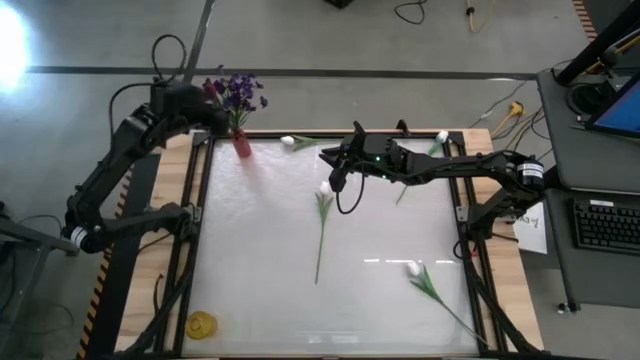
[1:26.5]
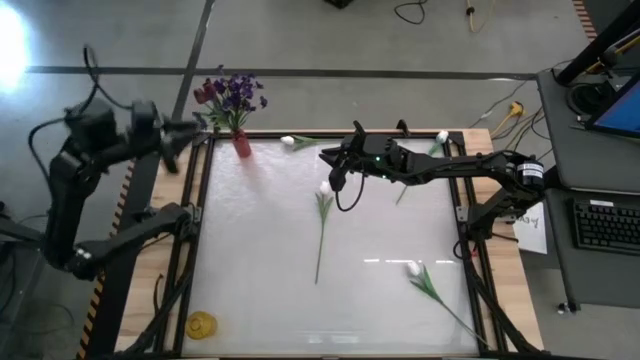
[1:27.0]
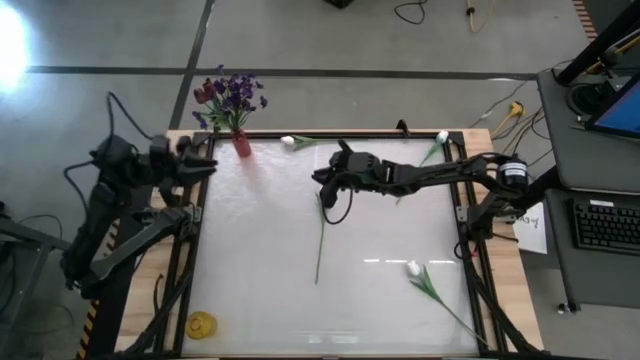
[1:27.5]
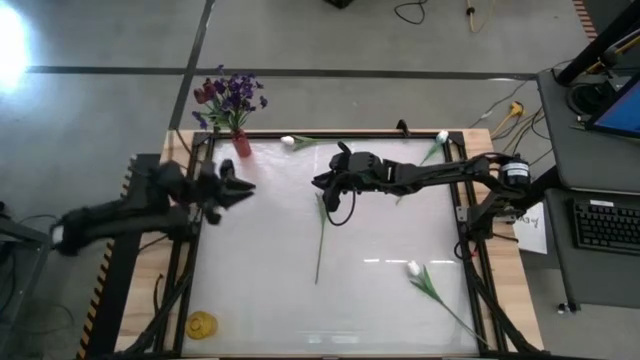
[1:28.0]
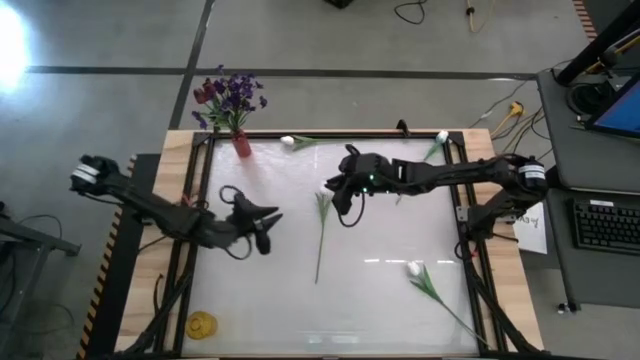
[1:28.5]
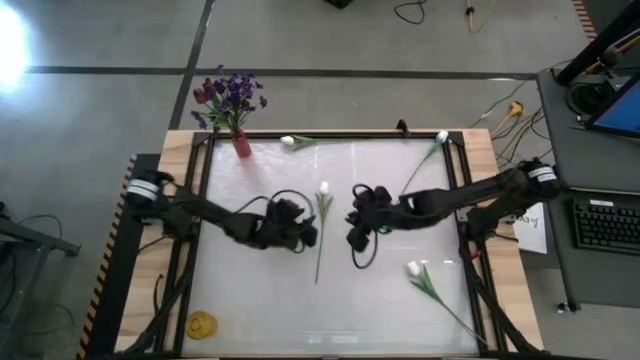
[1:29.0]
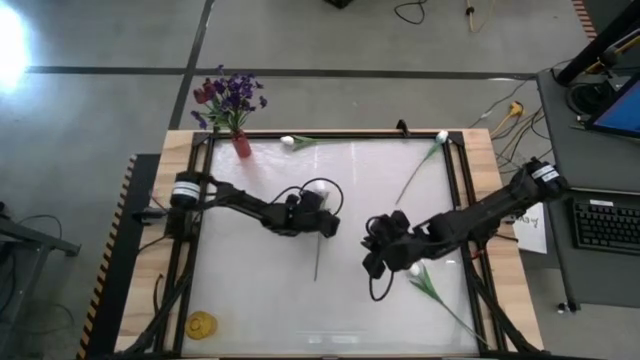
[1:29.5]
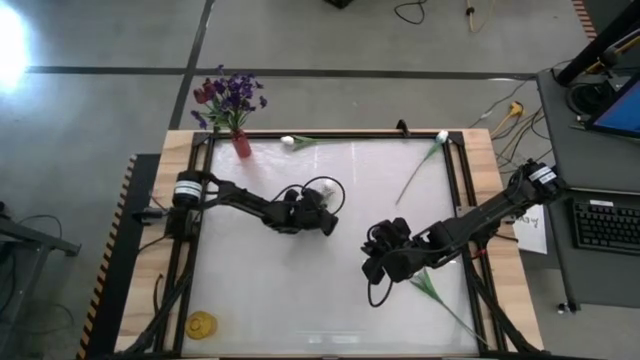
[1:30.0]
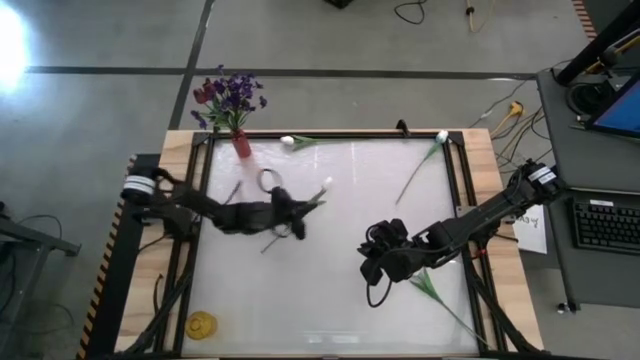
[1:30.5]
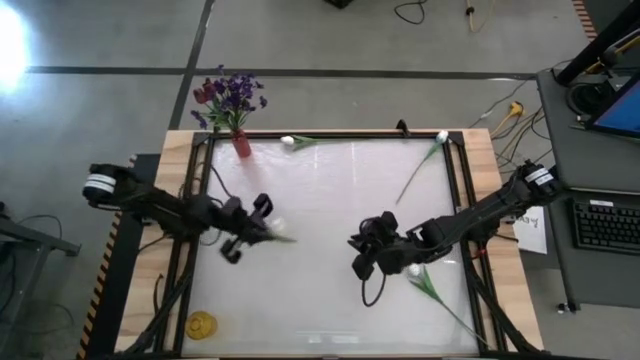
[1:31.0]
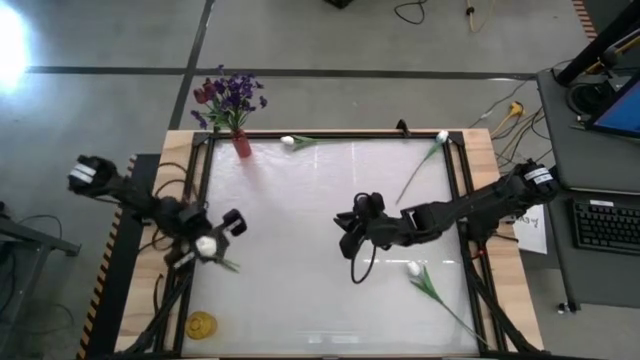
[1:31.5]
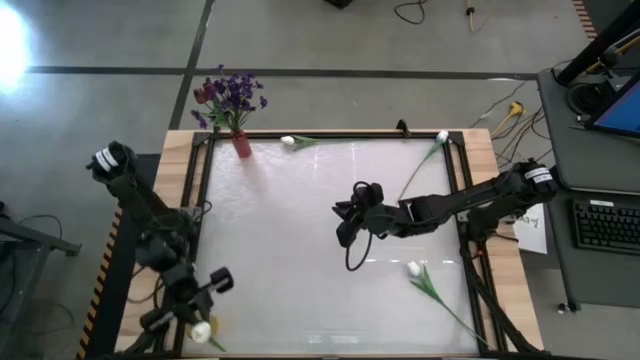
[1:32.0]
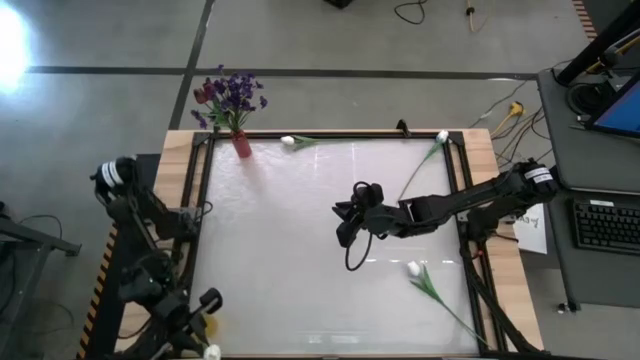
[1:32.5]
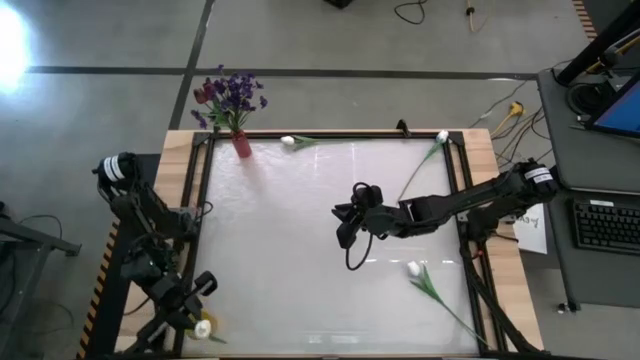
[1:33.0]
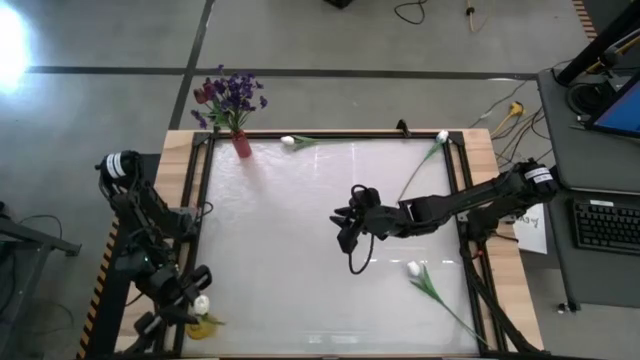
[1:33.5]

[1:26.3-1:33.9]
Task: Sort flowers into vase by color
Put the middle white flower into the yellow vase

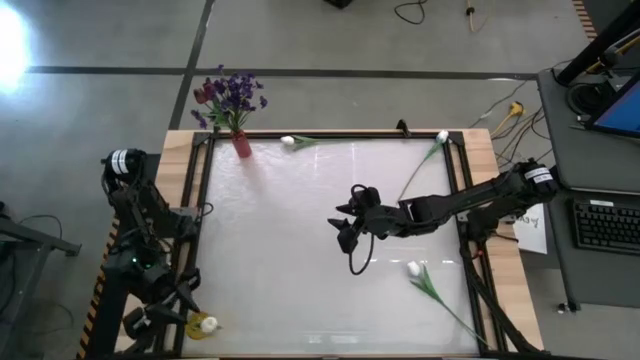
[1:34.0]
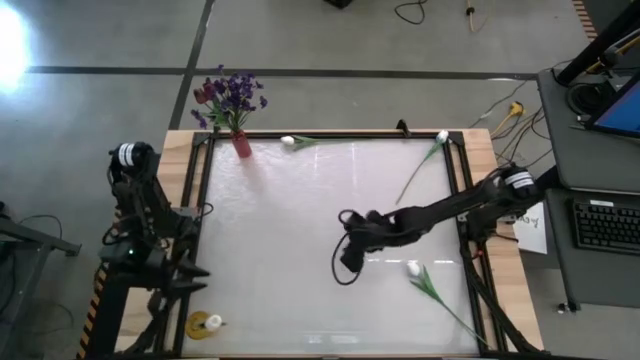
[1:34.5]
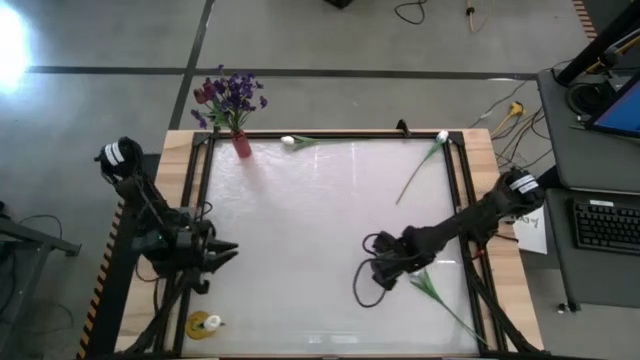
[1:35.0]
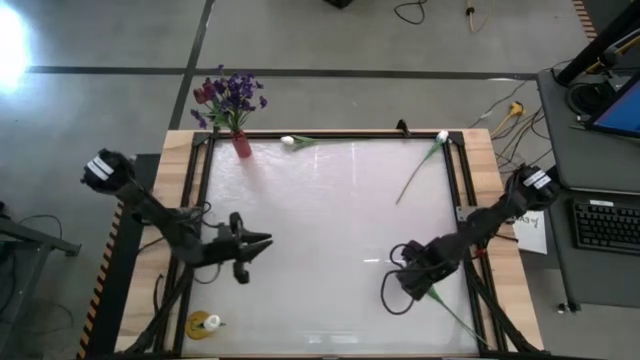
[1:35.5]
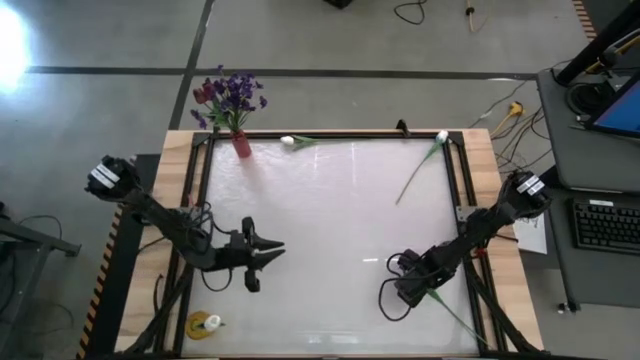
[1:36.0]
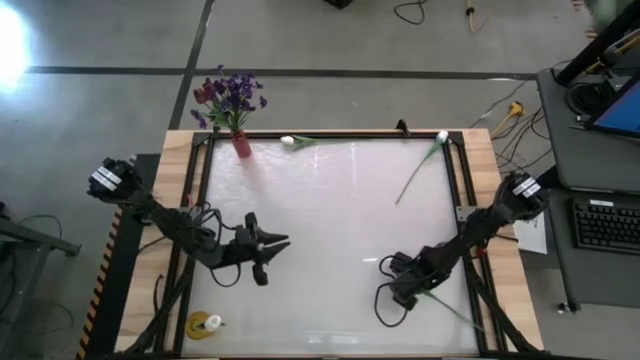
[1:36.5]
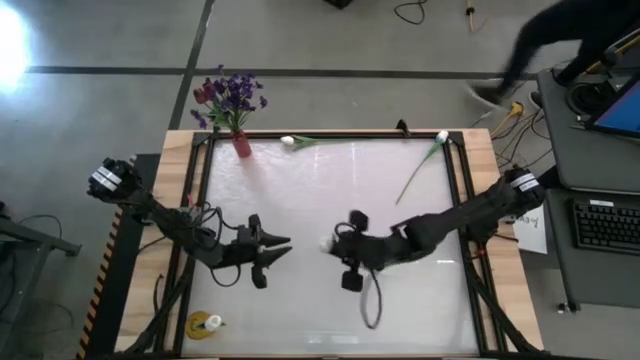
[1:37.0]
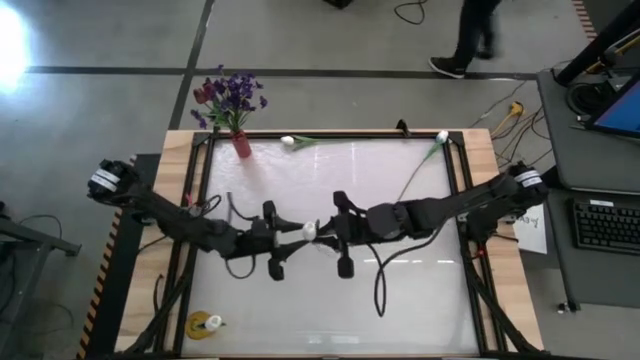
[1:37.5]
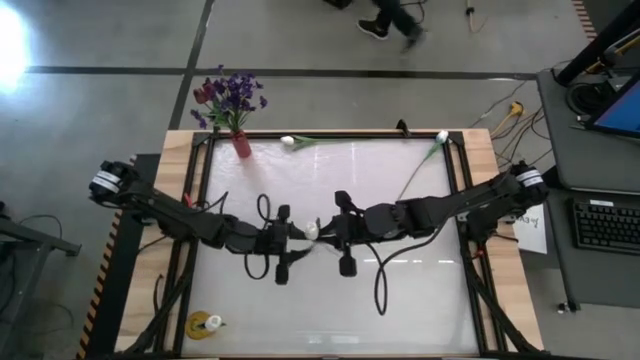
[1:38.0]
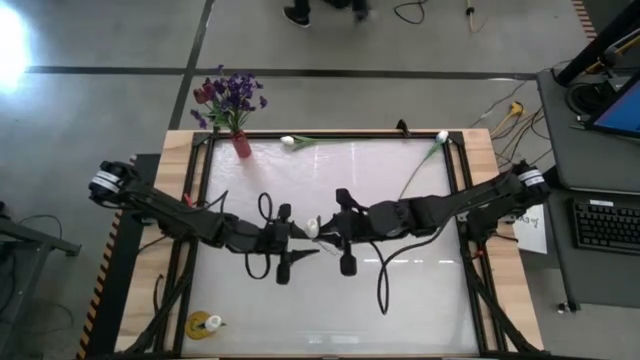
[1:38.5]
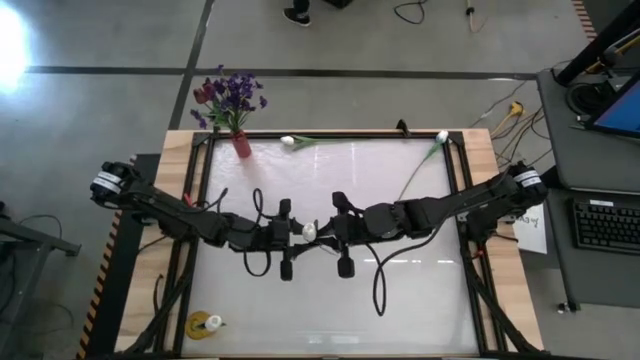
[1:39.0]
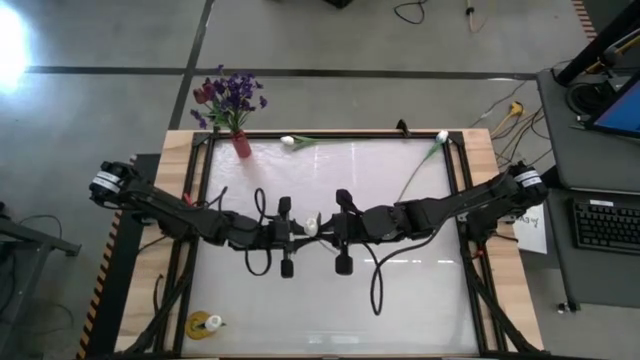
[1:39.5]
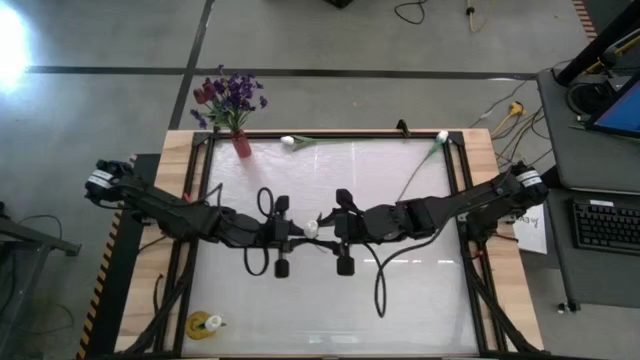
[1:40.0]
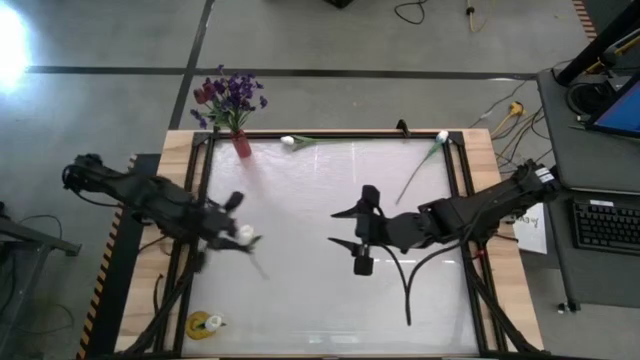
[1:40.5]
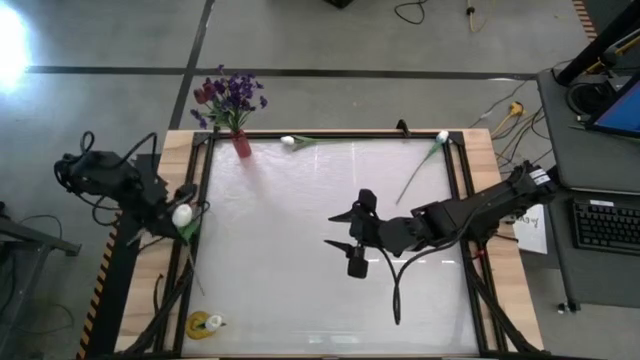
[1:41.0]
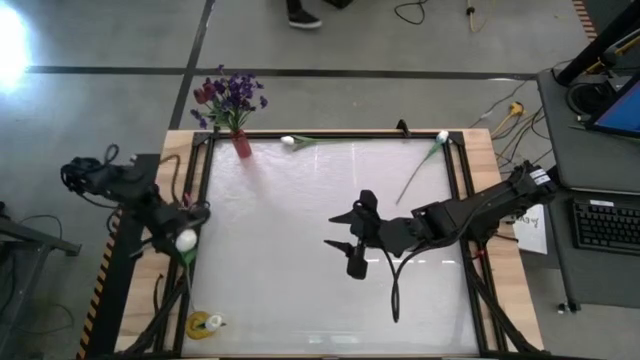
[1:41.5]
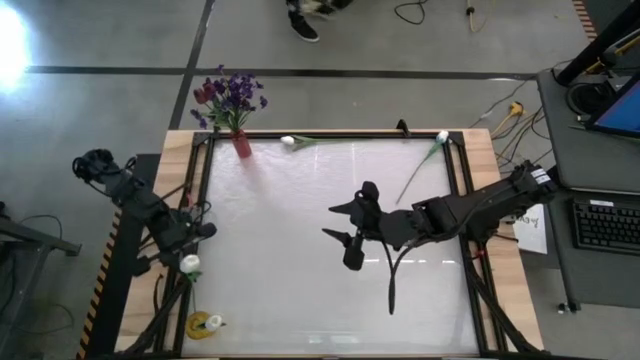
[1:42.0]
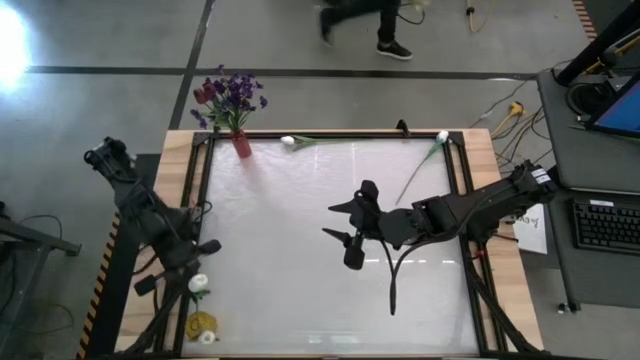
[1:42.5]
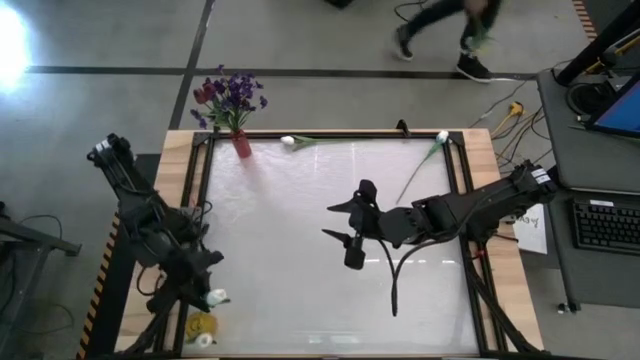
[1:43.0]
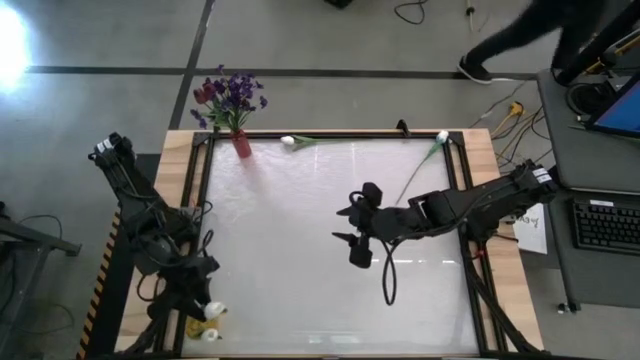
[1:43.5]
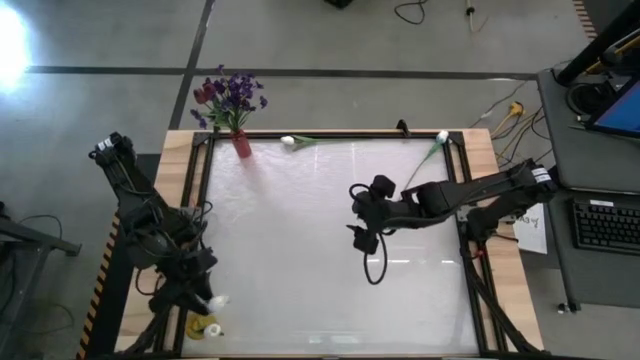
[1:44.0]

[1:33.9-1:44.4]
Put the bottom white flower into the yellow vase

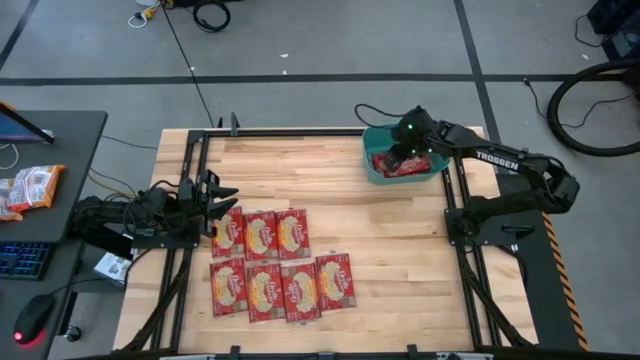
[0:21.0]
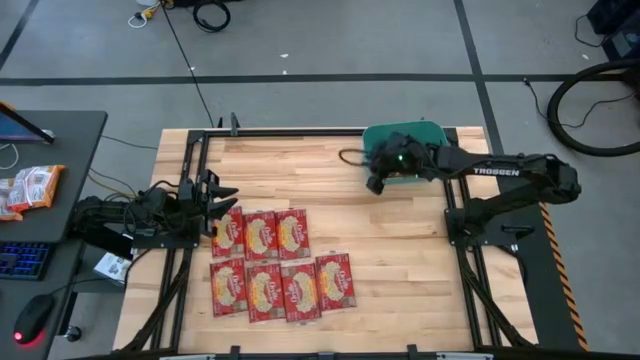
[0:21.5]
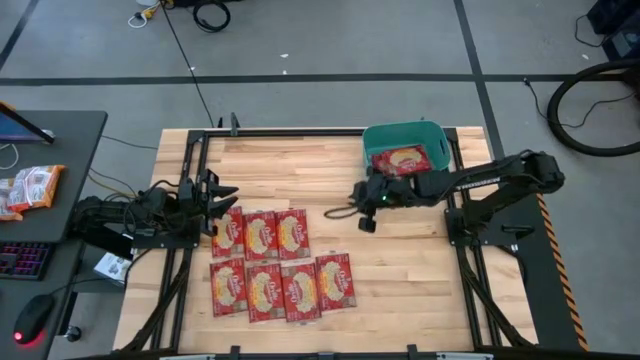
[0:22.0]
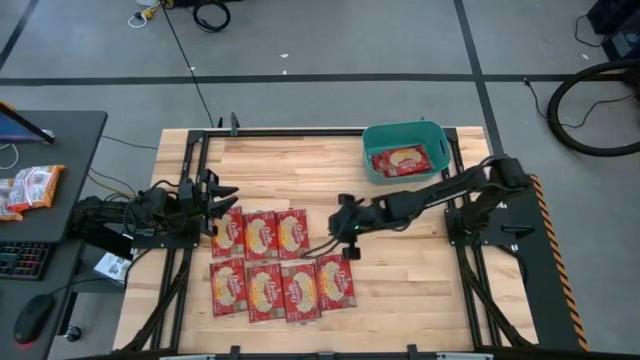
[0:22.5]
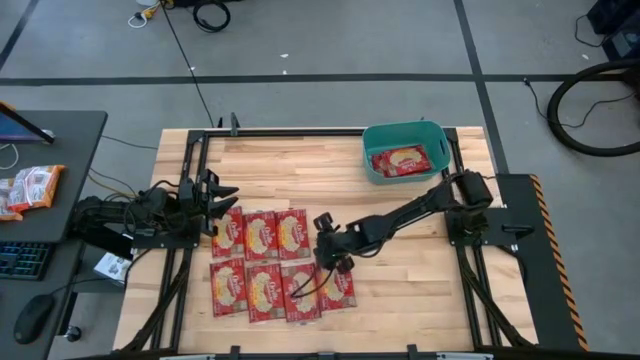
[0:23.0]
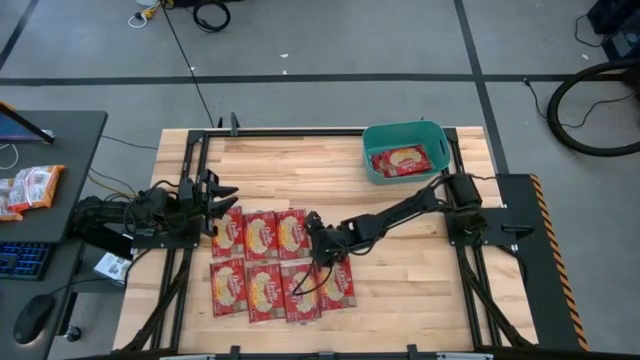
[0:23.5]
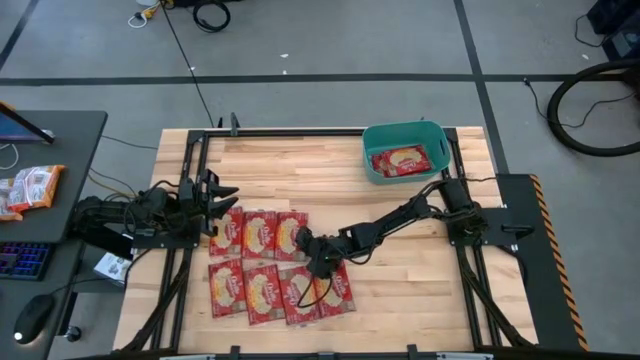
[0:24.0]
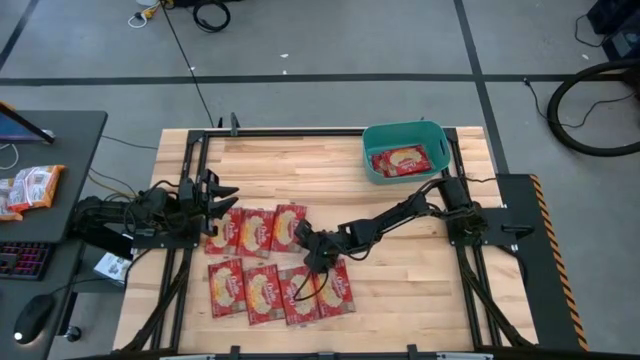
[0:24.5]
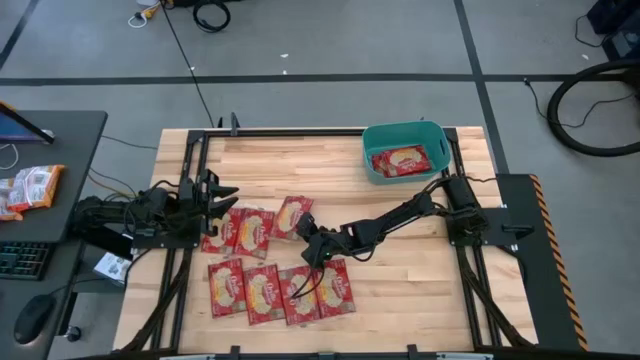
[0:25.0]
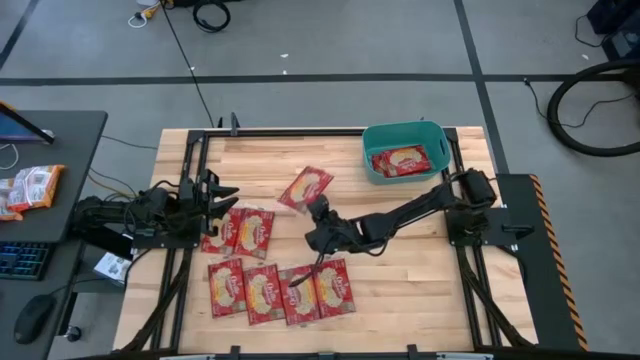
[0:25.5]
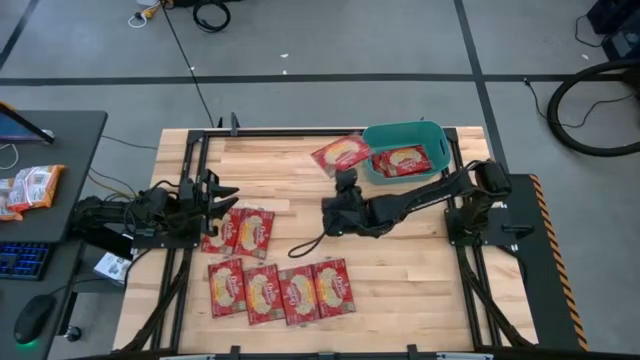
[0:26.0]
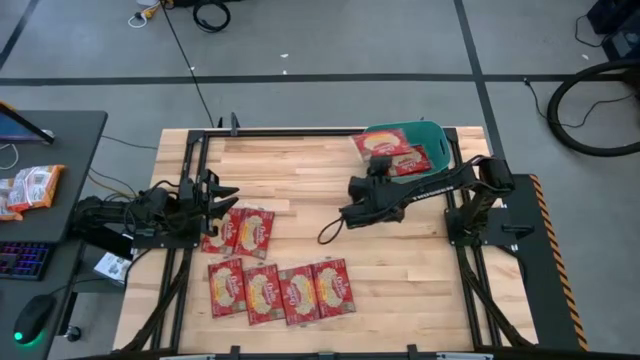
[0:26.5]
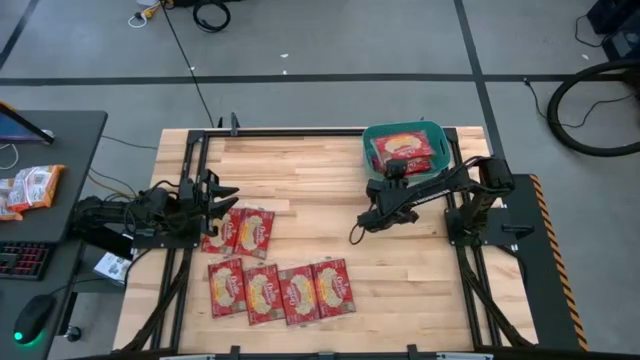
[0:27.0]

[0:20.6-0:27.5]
Task: Sort popcorn bags into baskets
Put the red popcorn bag into the green bin
